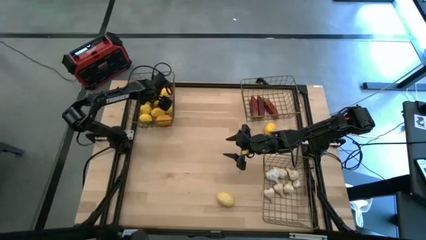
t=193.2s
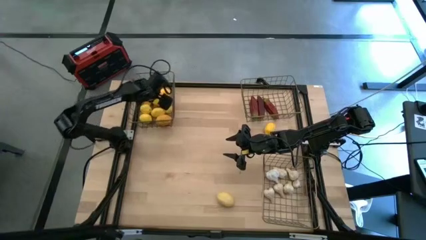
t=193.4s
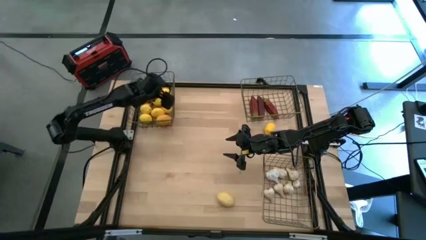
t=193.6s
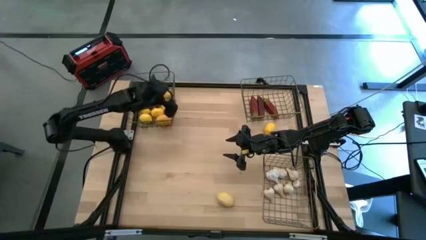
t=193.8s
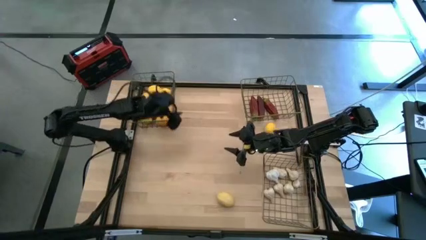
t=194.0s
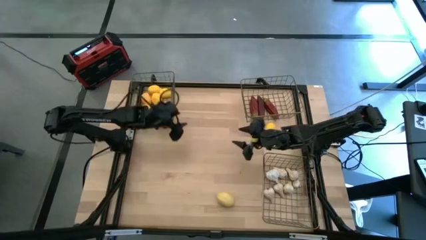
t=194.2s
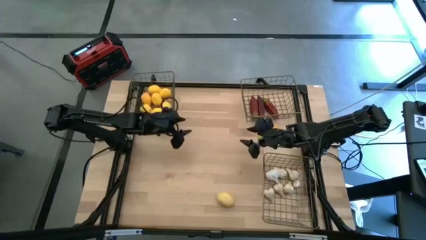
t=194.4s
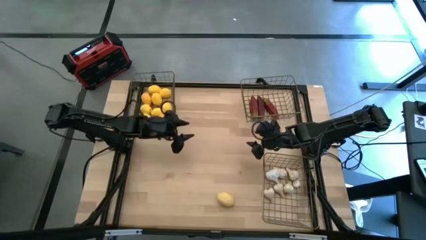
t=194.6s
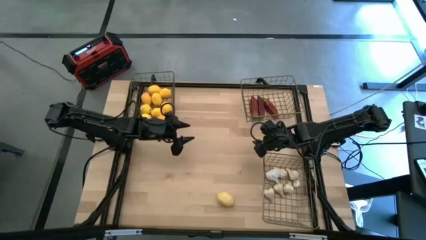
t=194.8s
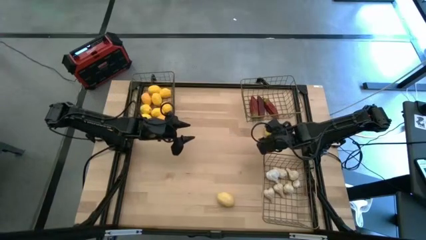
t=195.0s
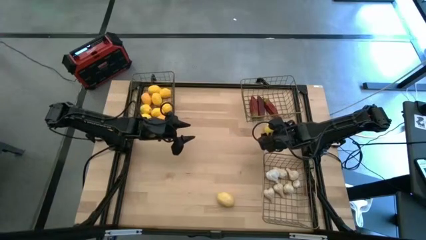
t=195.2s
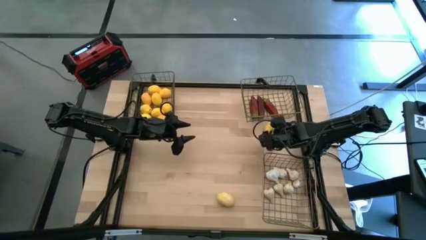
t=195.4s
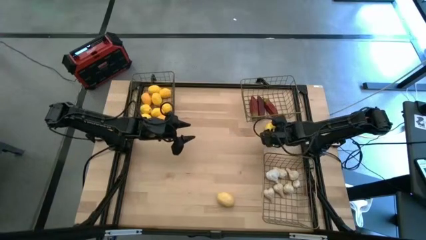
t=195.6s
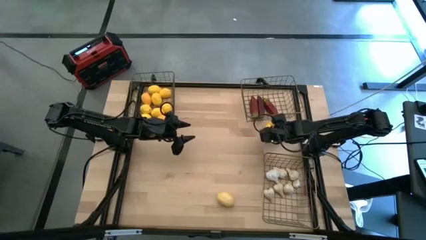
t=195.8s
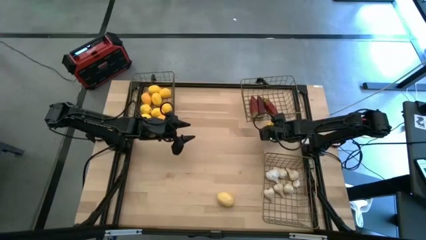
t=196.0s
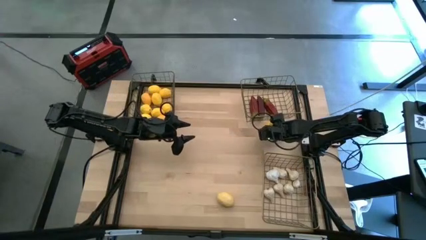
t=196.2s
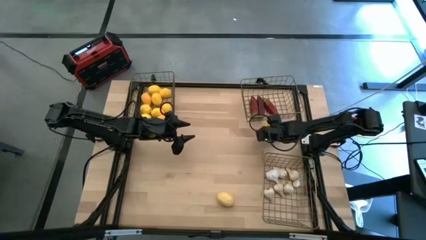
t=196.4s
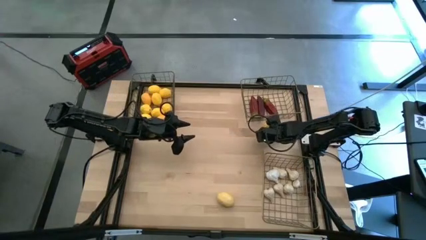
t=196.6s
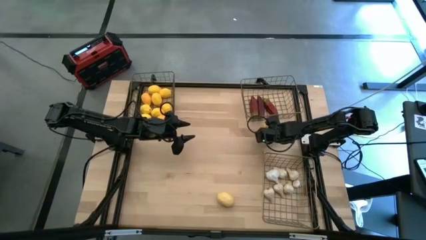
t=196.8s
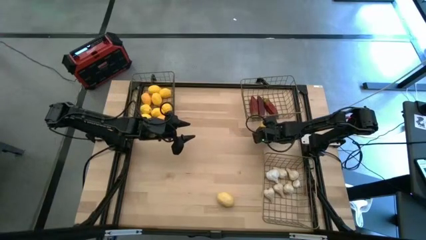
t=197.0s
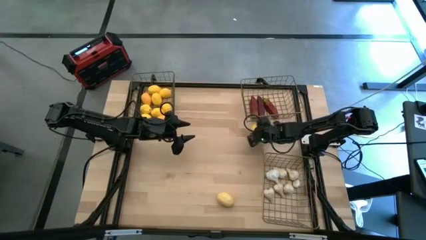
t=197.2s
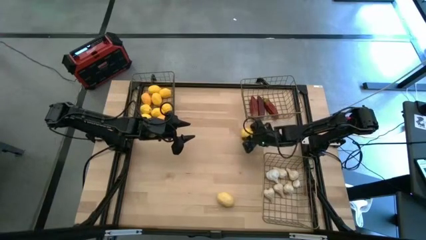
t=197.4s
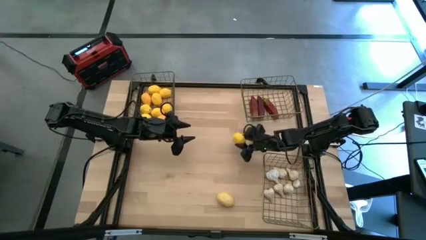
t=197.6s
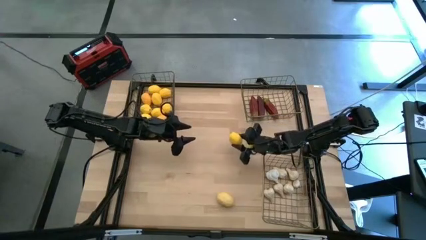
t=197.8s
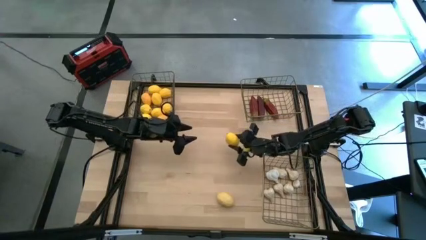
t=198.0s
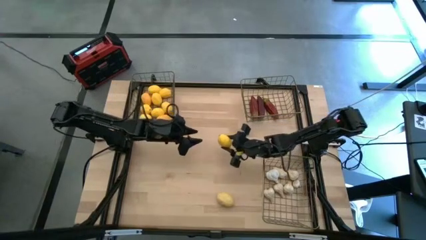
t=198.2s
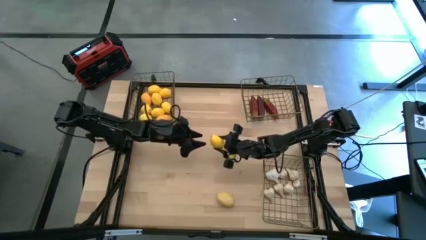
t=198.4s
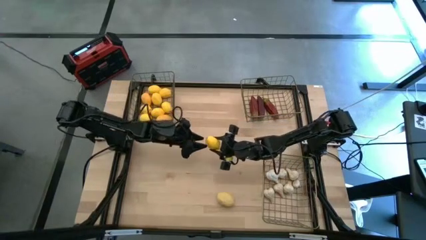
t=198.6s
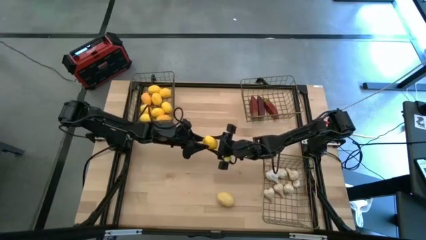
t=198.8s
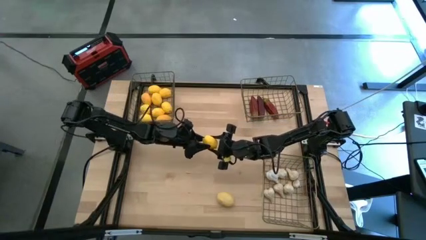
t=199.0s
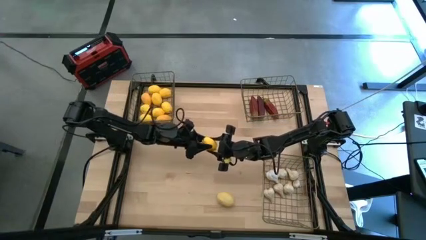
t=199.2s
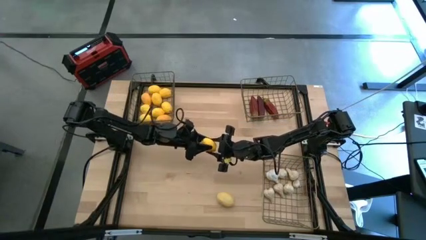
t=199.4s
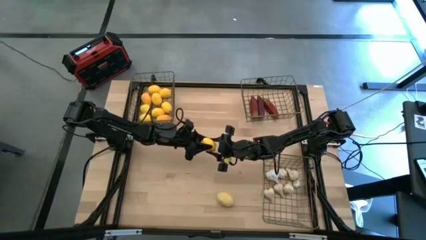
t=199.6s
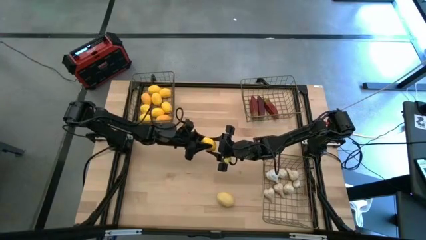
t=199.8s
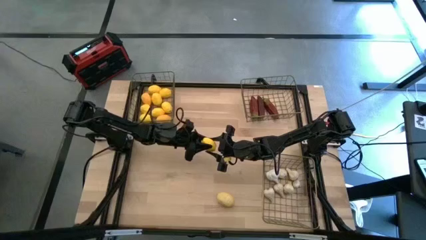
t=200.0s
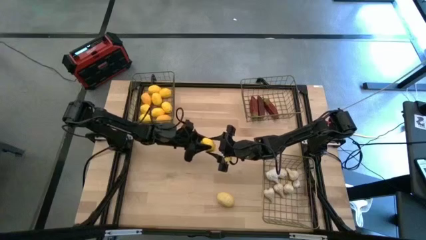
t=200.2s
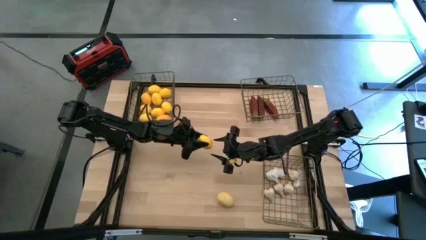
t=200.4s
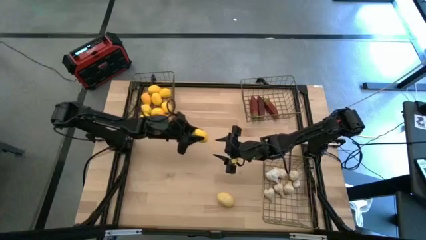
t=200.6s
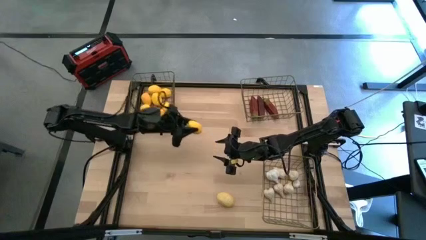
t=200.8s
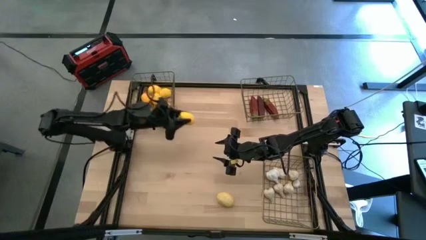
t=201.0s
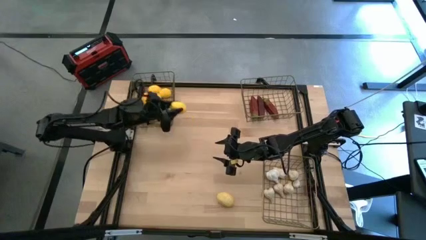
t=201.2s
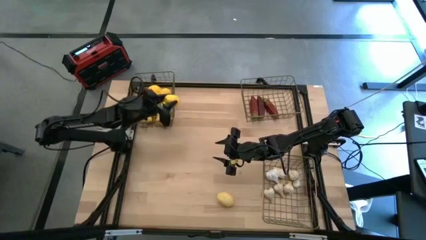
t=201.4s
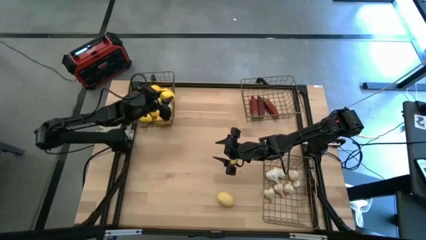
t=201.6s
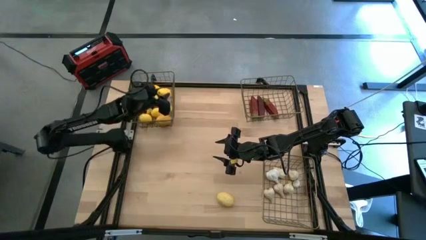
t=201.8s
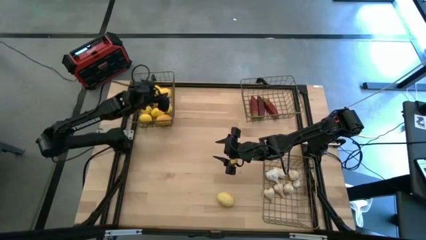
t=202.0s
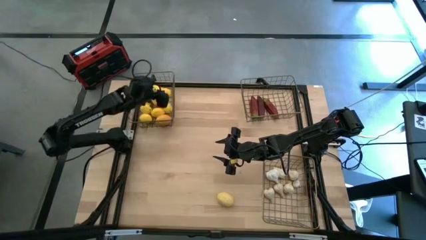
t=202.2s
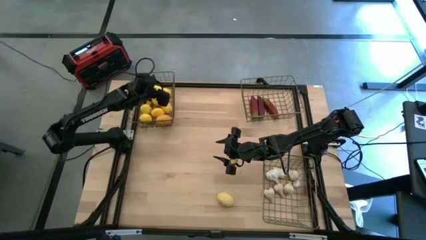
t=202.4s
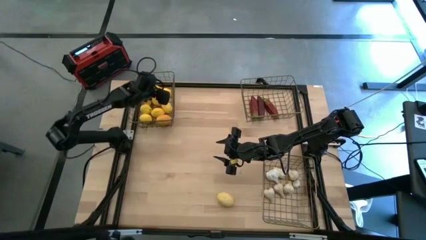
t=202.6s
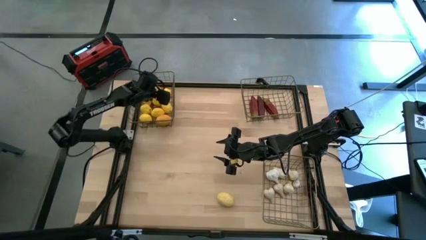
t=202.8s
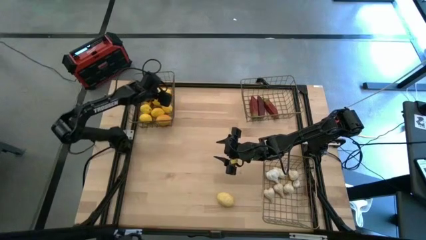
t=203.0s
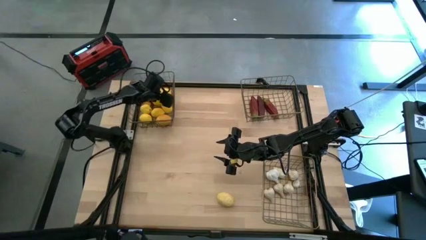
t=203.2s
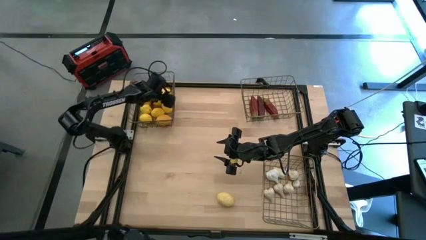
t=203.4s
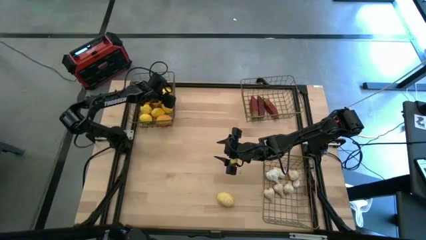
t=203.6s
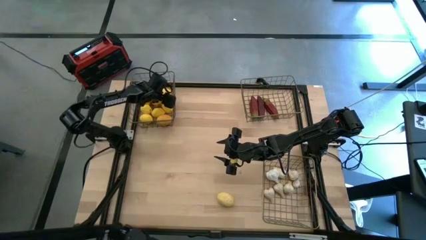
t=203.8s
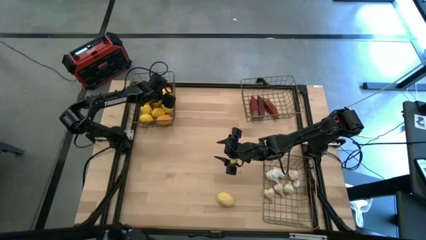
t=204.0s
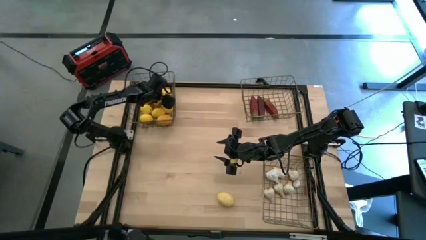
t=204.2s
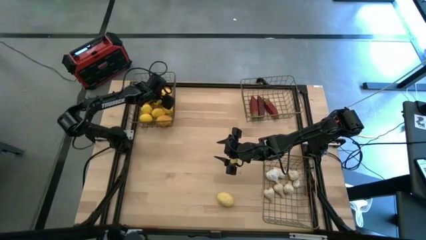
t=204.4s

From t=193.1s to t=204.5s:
Task: Sort produce into baskets
Put the yellow lemon into the top left wire basket
